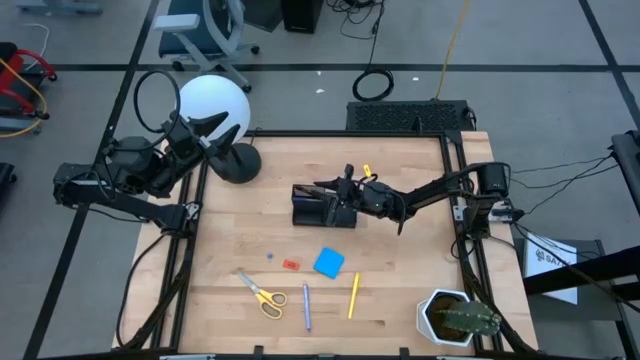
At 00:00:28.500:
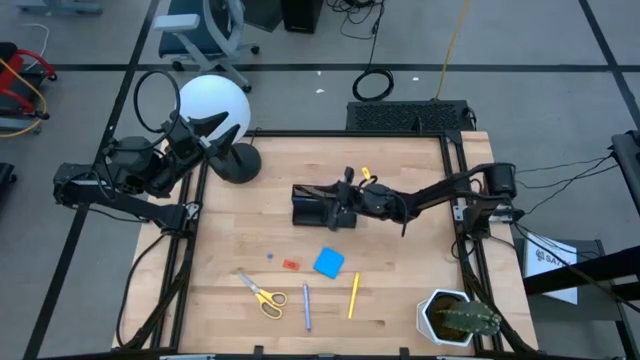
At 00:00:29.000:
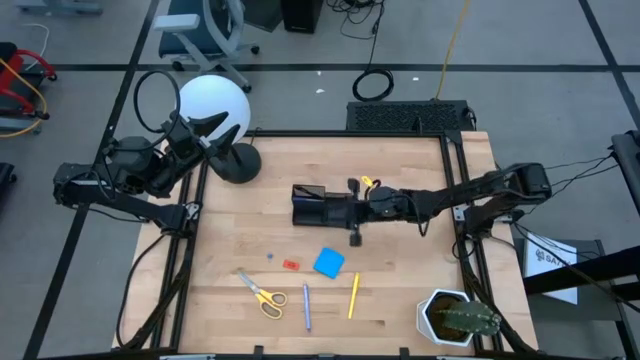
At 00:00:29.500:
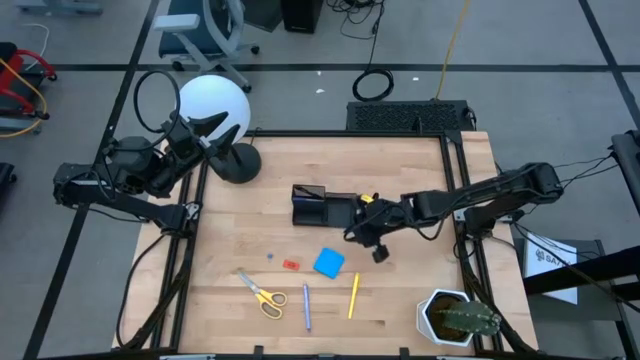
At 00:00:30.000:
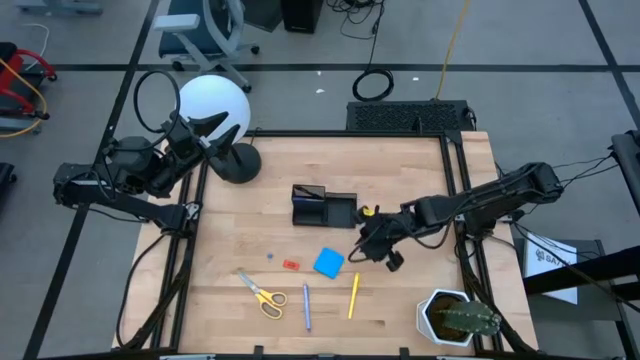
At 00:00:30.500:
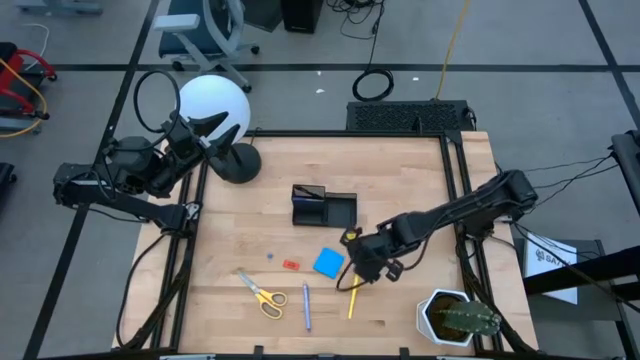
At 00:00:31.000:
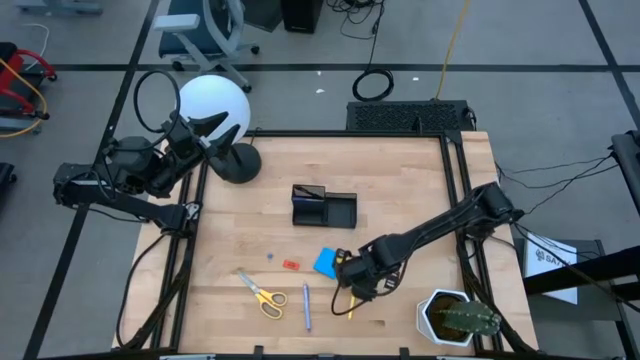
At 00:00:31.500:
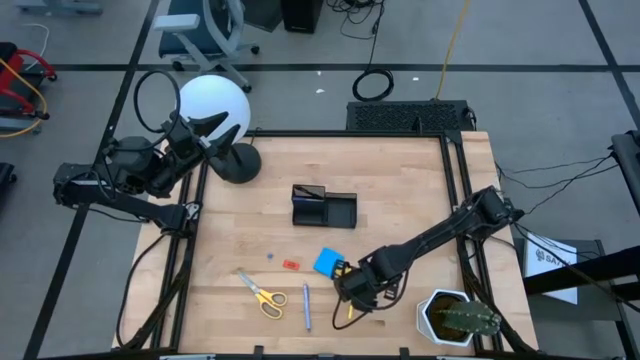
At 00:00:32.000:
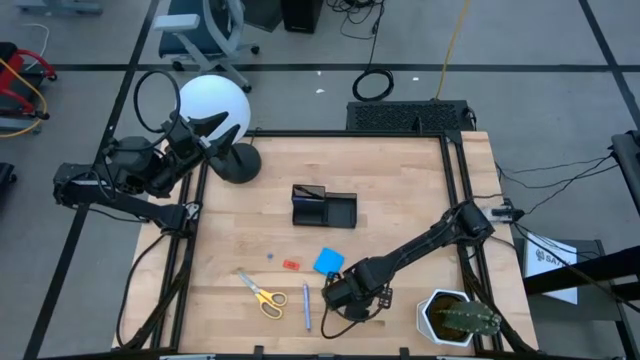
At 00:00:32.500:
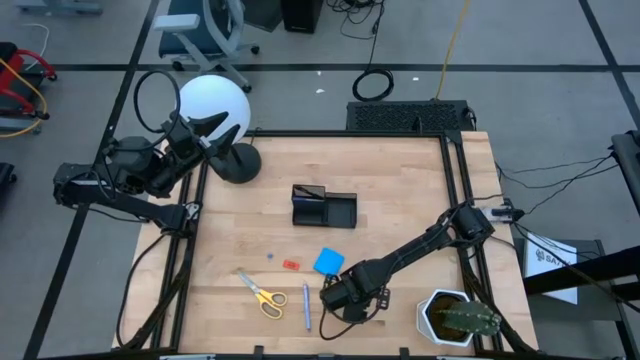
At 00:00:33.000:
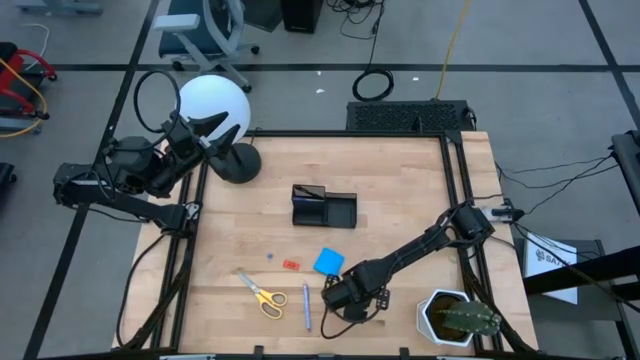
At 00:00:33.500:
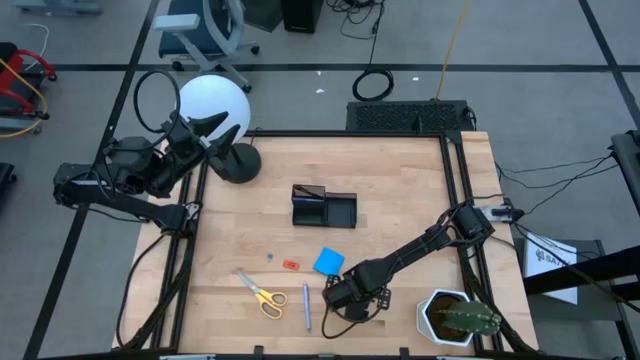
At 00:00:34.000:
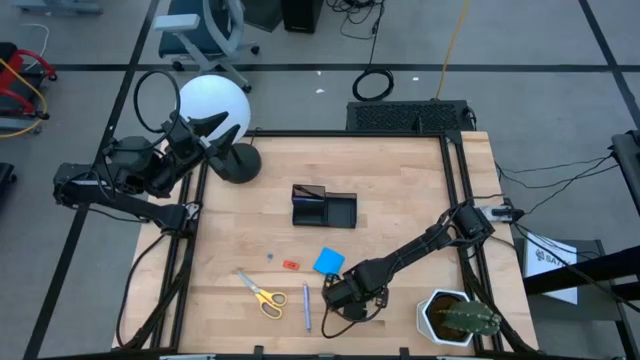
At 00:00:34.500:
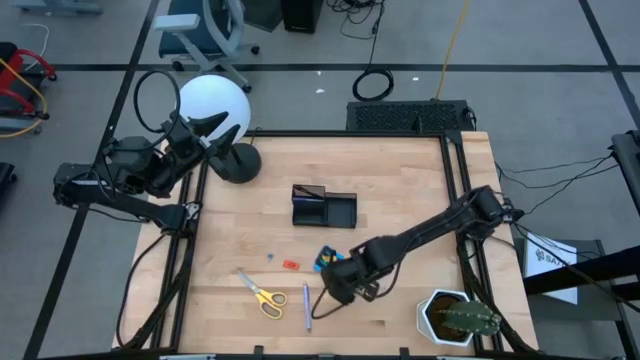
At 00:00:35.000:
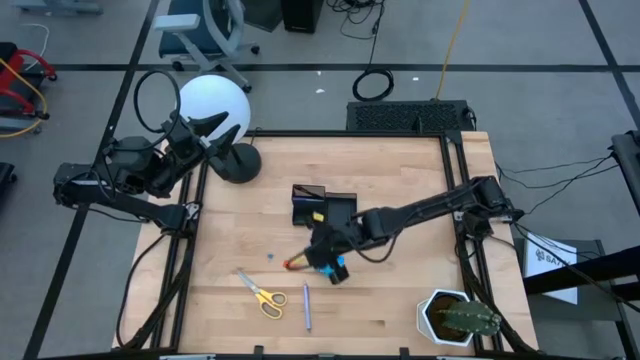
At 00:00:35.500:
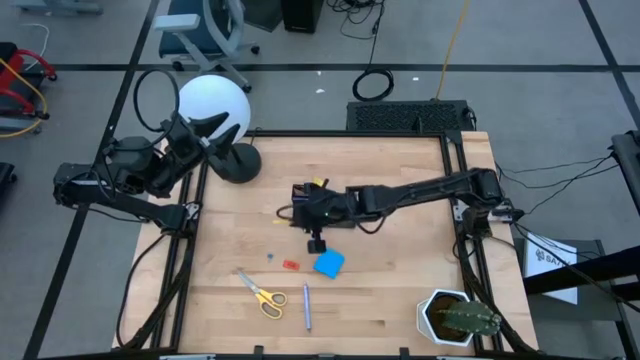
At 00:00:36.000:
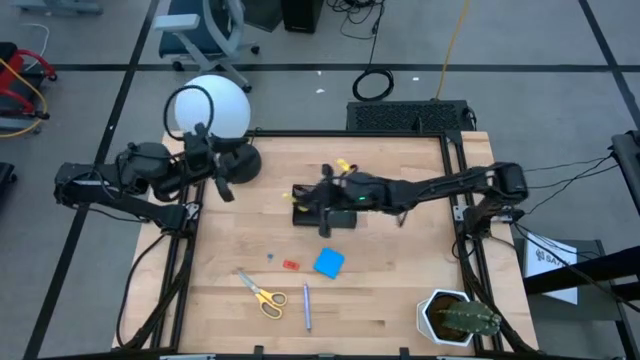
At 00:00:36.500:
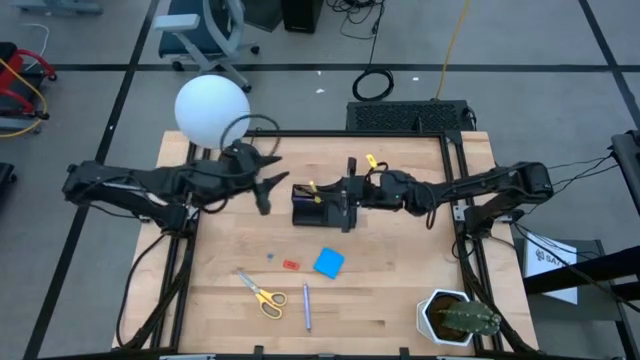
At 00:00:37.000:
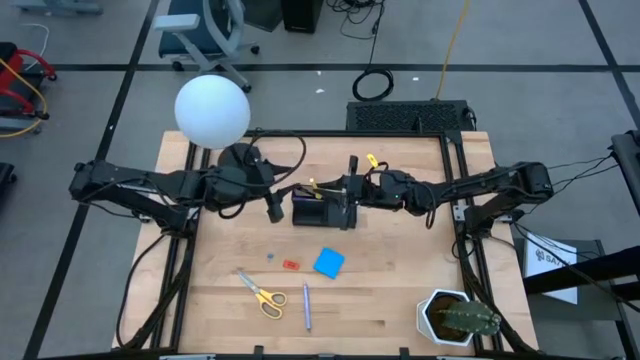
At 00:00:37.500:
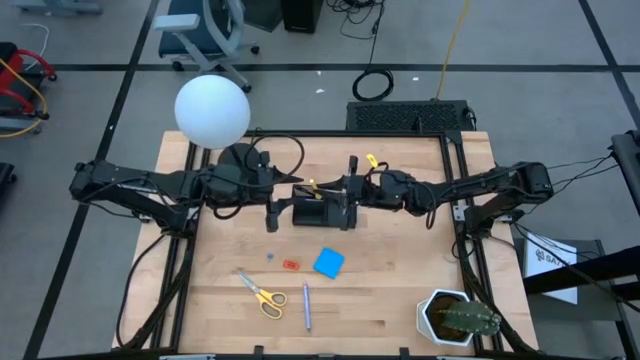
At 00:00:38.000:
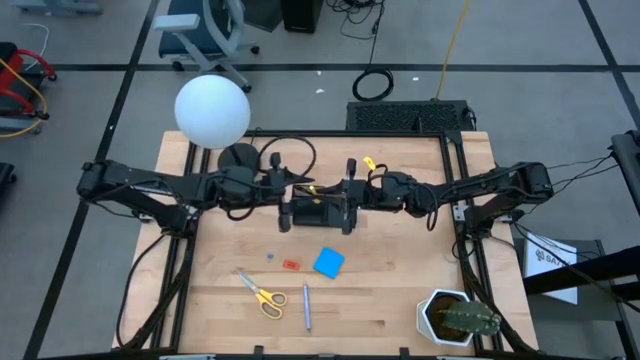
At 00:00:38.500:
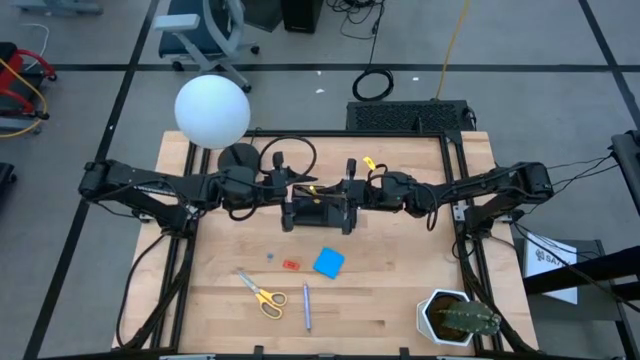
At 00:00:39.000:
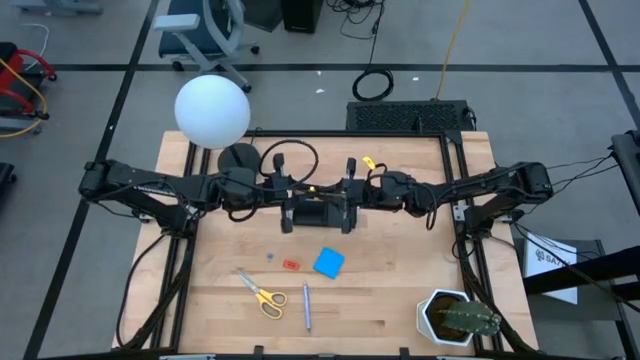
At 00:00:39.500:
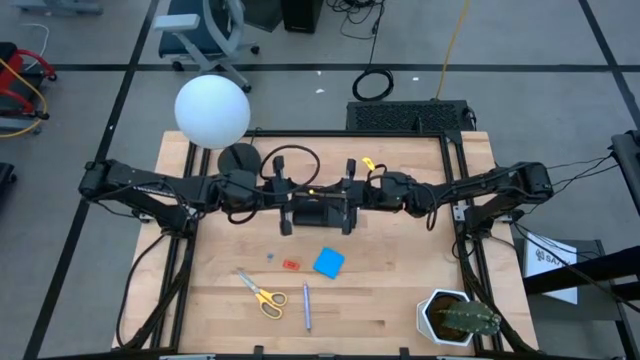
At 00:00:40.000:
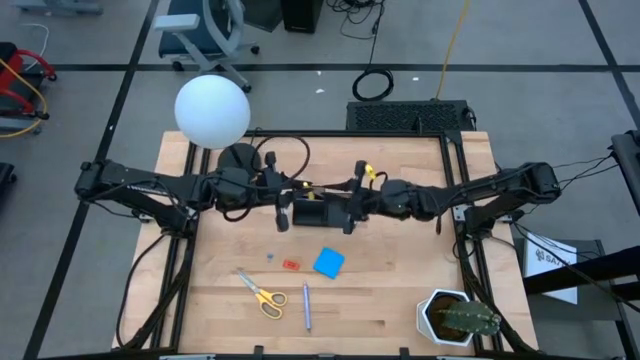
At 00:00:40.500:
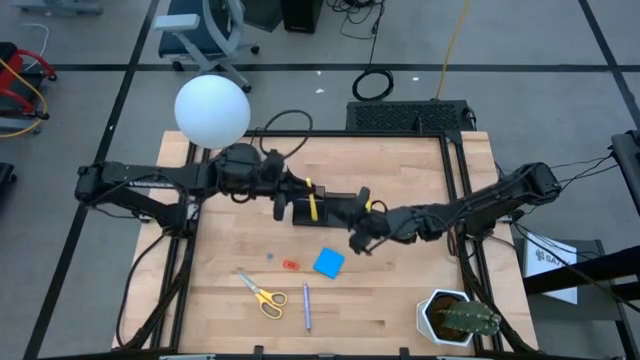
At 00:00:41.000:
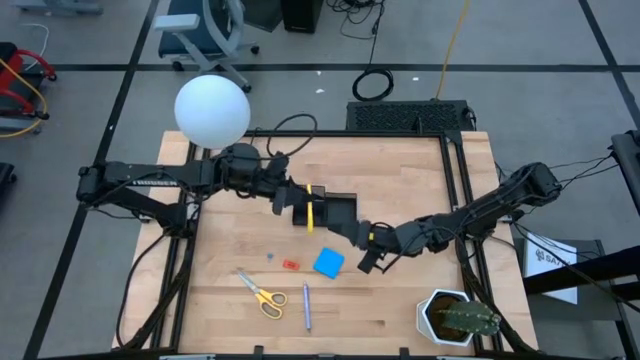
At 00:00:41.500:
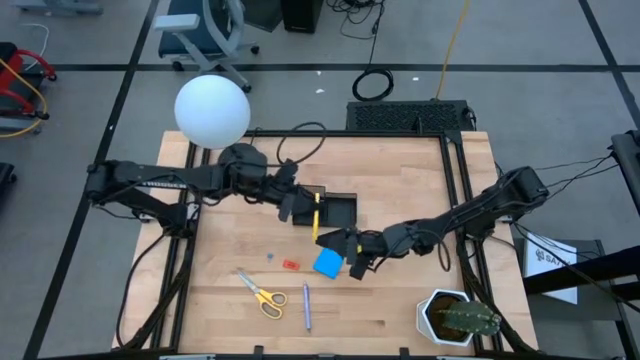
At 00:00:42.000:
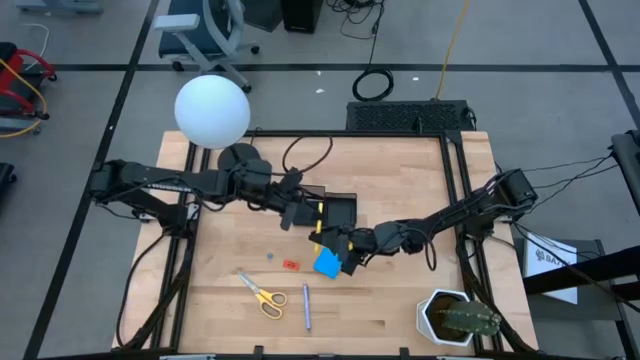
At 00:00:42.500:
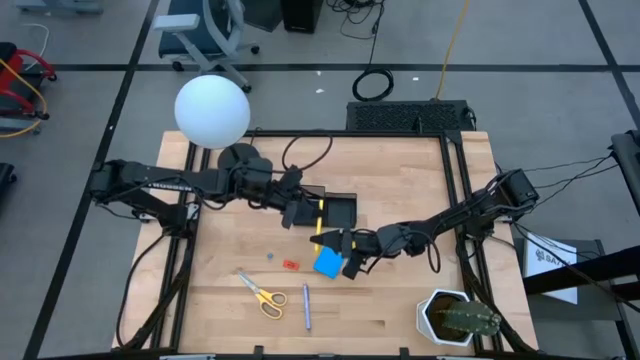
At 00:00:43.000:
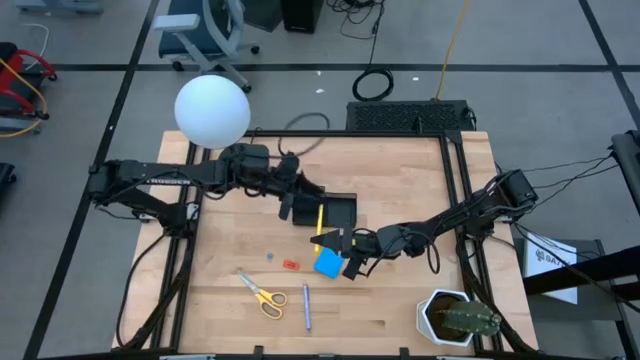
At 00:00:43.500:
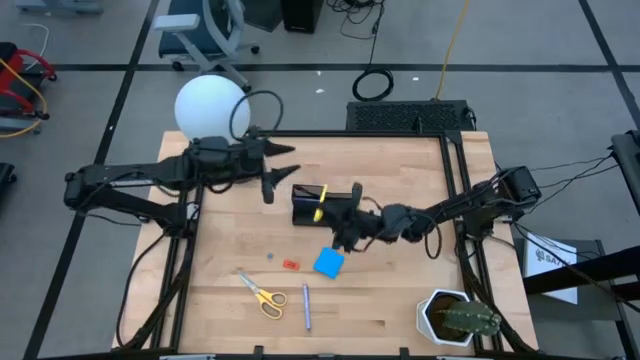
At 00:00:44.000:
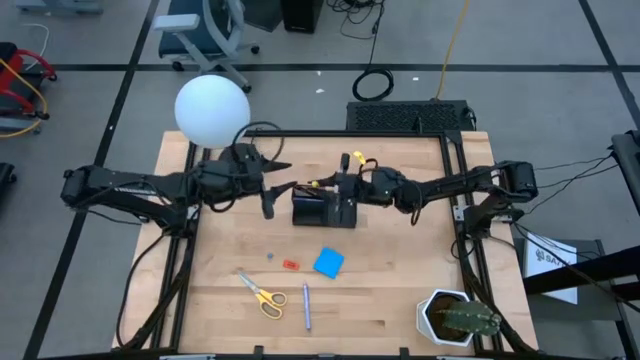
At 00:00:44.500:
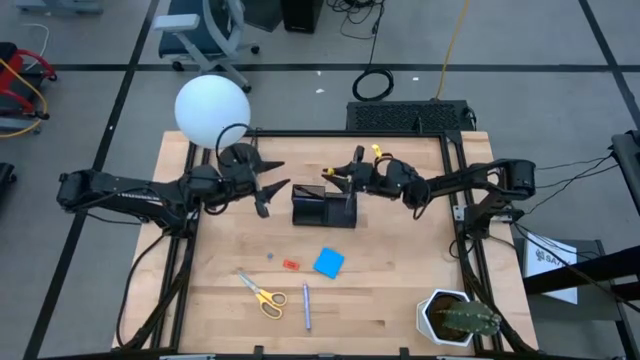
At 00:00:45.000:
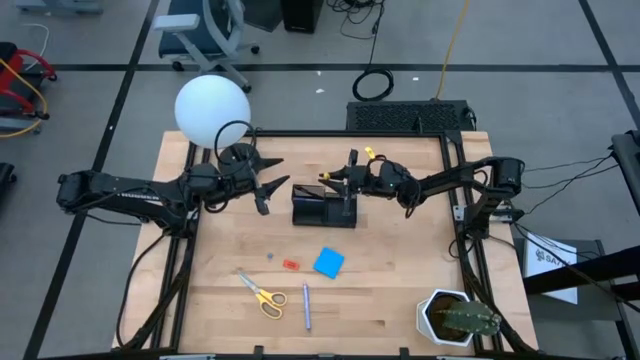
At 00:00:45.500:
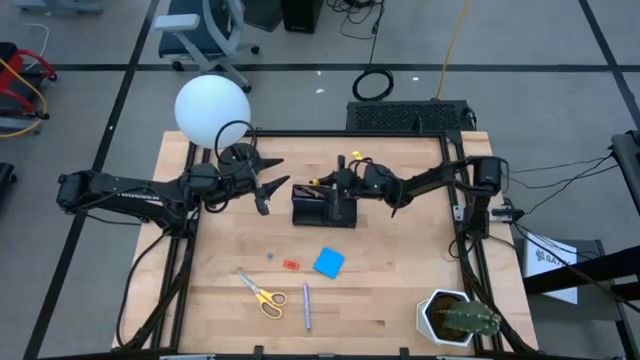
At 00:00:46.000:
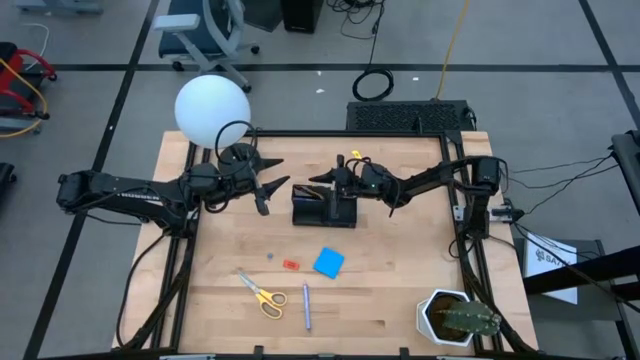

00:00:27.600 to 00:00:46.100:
Task: Pick and place office supplies into organizer
Put the yellow pen into the desk organizer
